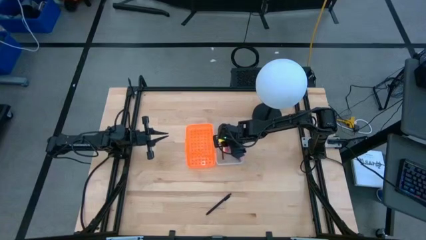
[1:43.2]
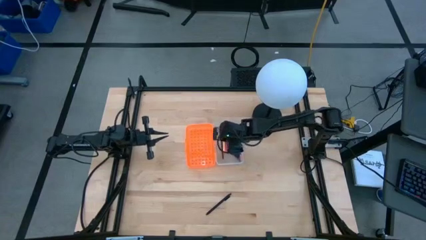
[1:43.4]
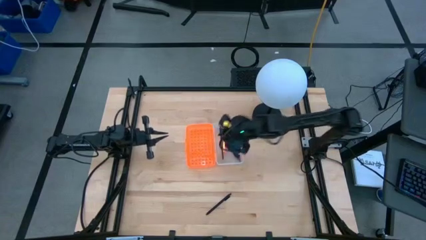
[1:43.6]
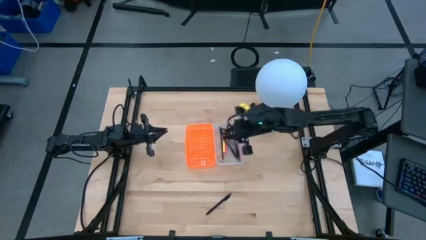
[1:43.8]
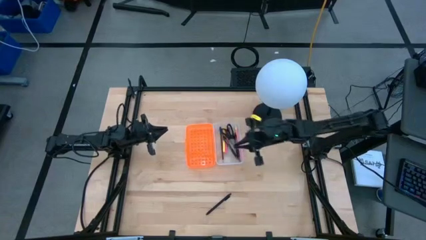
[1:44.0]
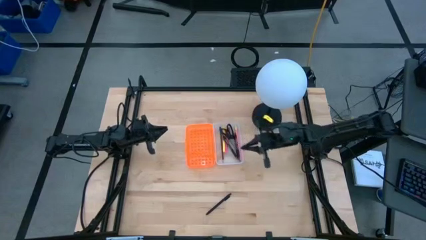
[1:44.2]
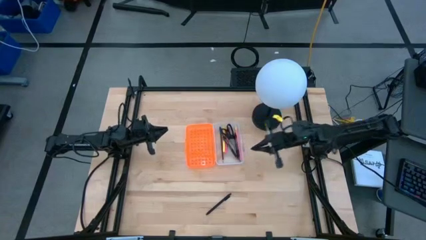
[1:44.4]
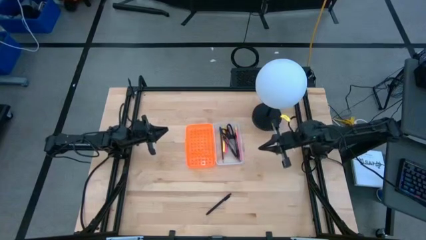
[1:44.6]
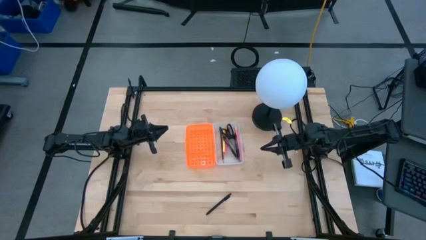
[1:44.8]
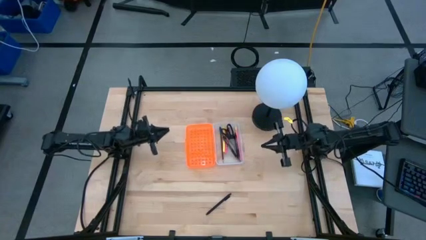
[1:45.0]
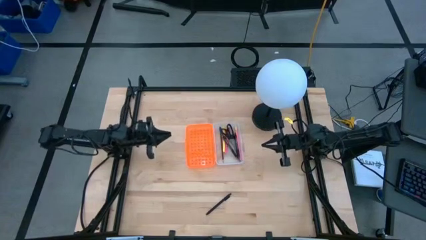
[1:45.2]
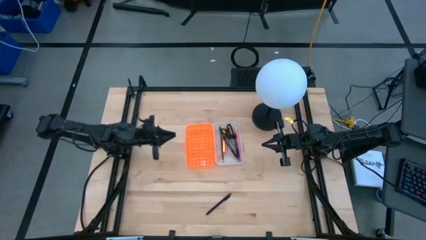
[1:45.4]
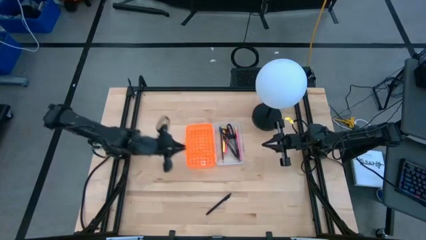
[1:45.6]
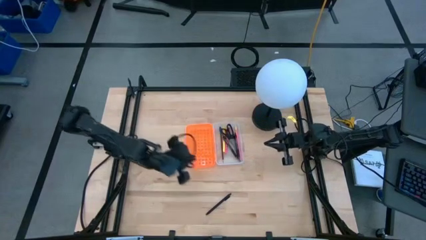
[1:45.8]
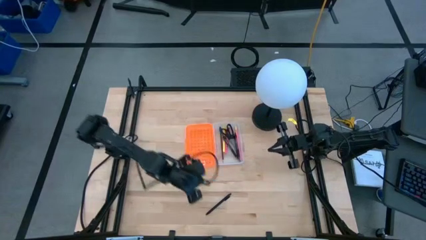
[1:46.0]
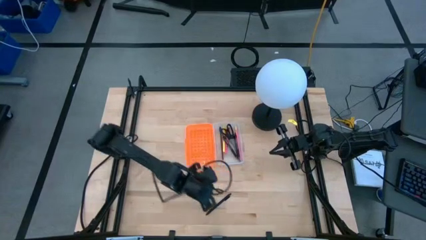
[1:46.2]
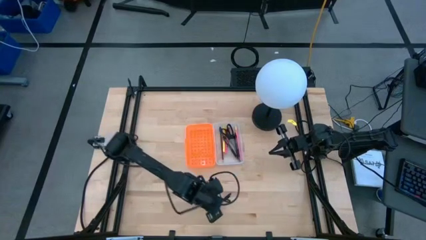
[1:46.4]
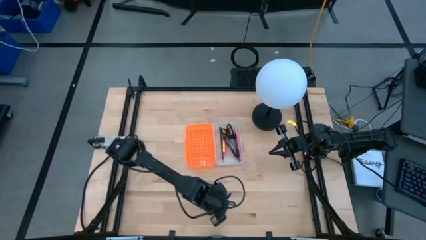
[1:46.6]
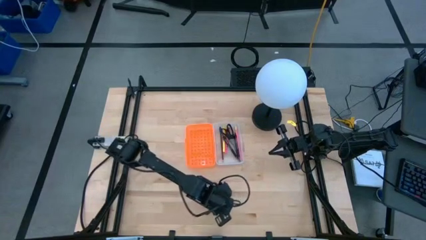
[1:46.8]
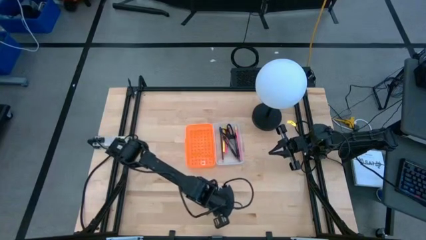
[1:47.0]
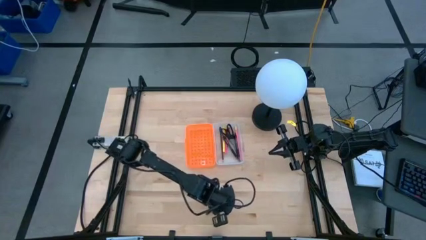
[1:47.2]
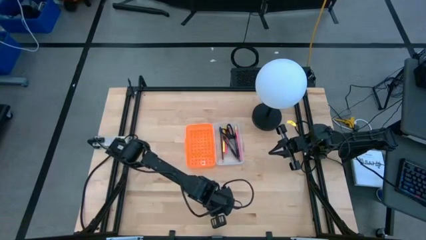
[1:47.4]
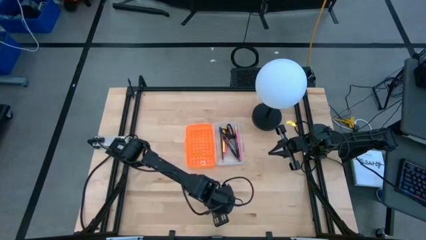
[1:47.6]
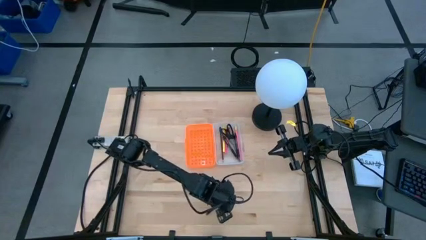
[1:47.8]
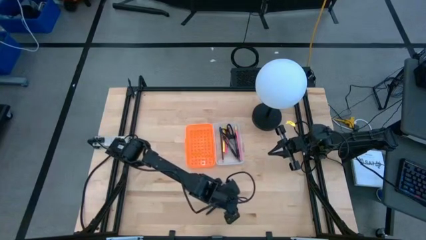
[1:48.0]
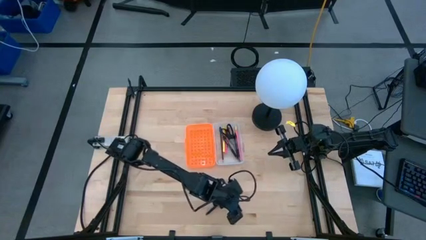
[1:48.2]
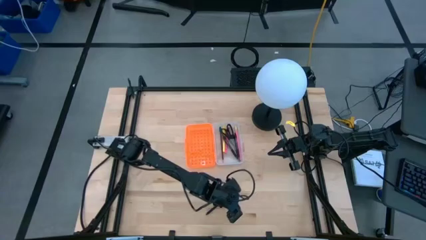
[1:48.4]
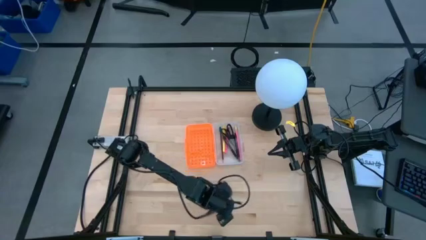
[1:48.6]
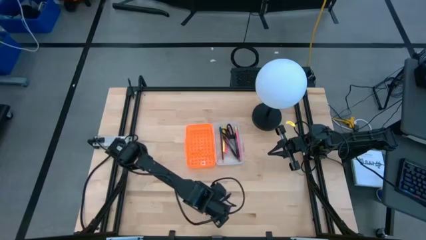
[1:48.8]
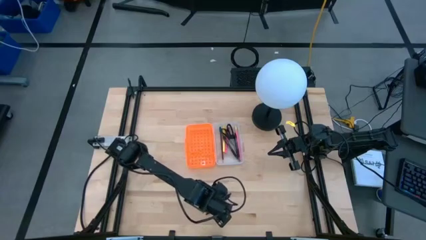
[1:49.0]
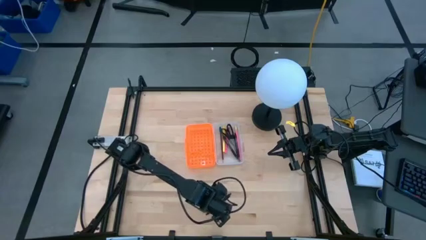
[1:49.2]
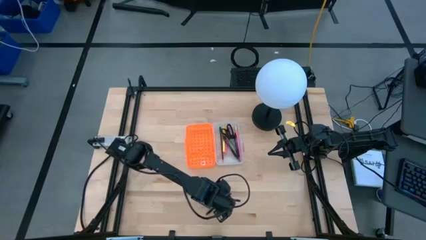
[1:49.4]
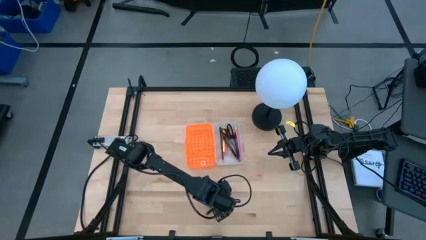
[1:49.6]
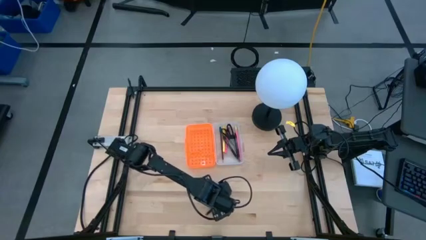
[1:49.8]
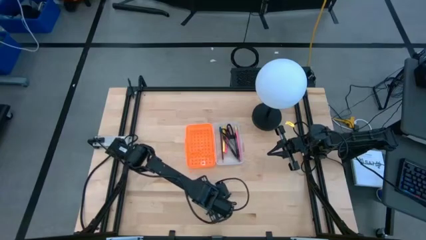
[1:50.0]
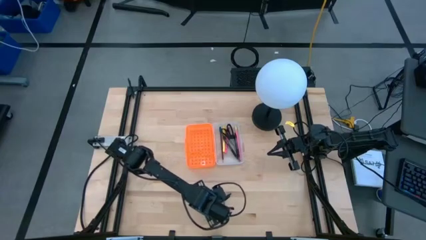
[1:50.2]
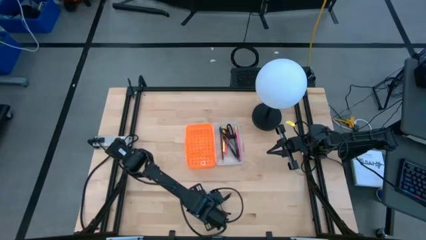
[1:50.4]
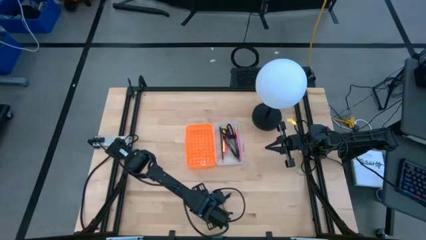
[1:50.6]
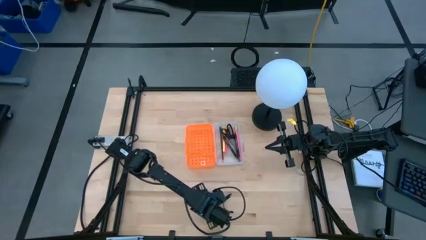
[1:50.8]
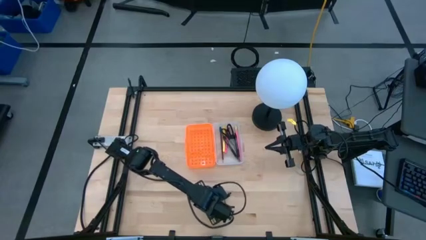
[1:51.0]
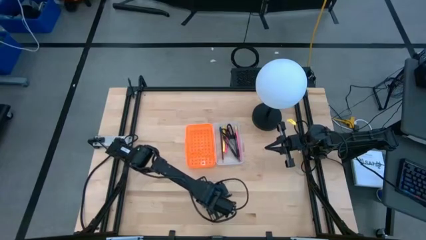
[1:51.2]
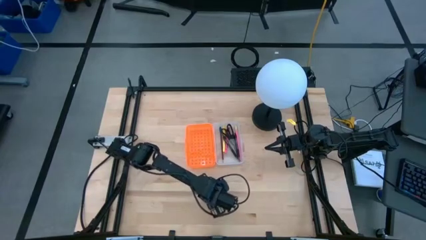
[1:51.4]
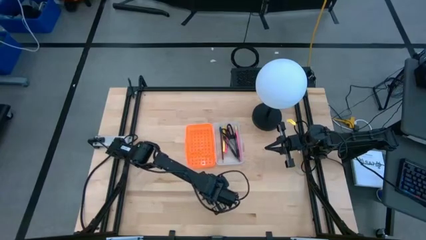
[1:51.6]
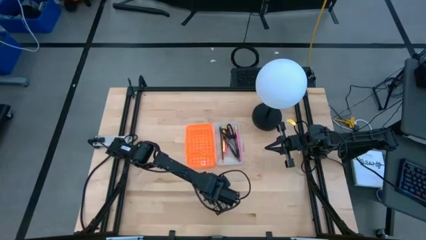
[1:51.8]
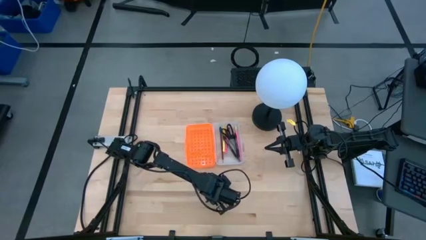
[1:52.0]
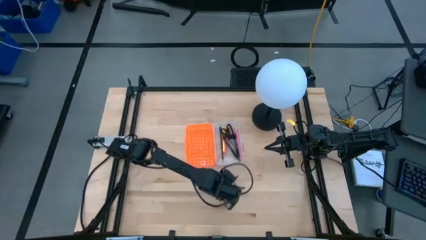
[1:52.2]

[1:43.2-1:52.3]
Task: Pick & place school supplies into a supply box
Put the black pen into the orange supply box

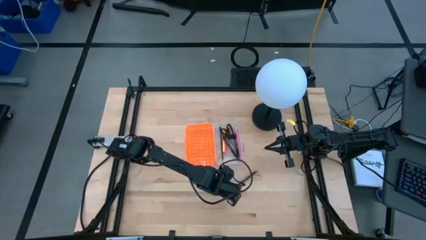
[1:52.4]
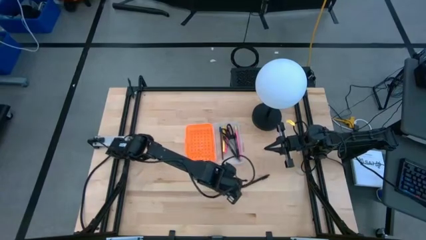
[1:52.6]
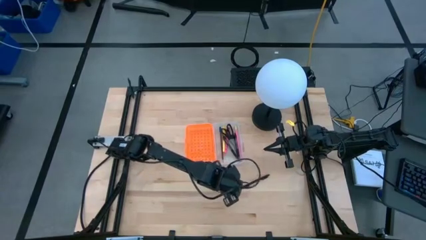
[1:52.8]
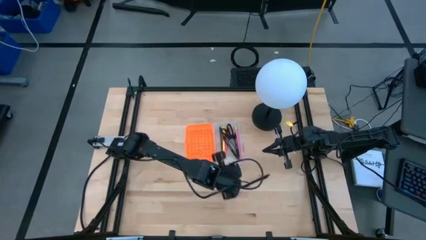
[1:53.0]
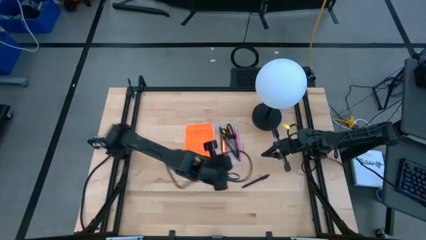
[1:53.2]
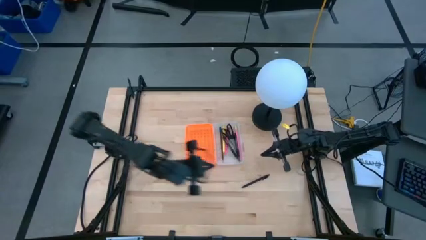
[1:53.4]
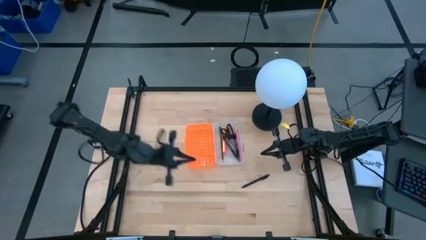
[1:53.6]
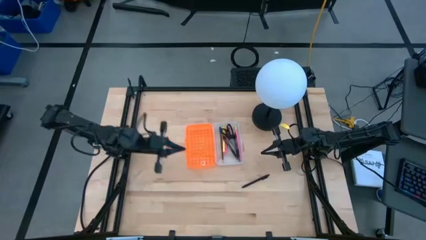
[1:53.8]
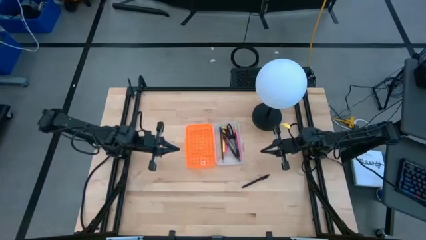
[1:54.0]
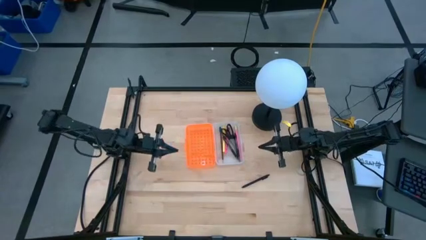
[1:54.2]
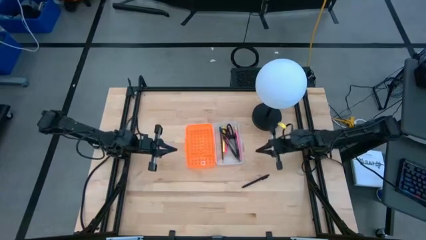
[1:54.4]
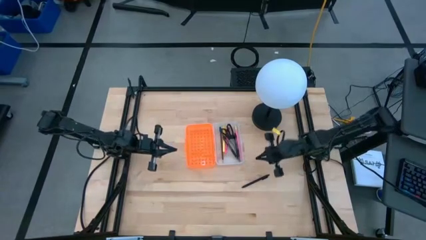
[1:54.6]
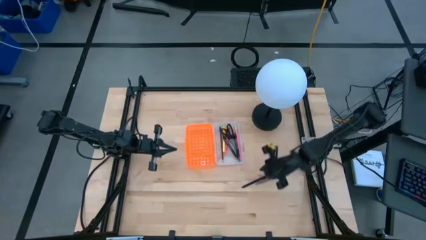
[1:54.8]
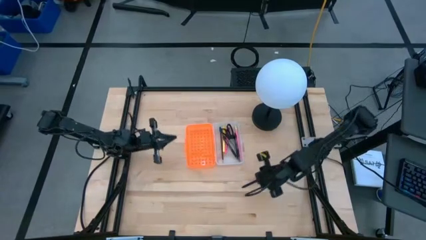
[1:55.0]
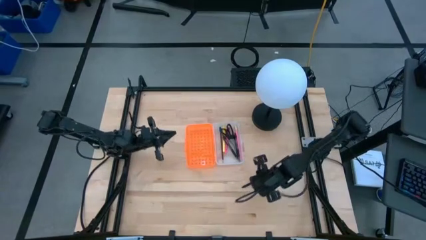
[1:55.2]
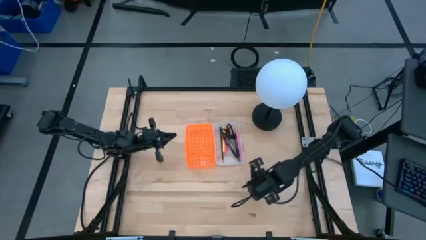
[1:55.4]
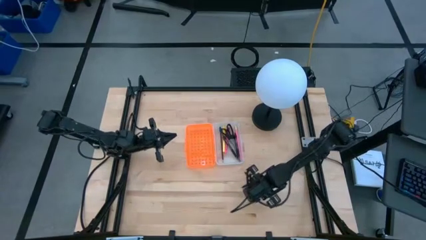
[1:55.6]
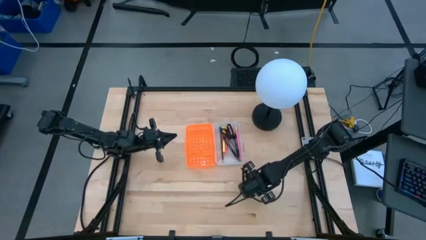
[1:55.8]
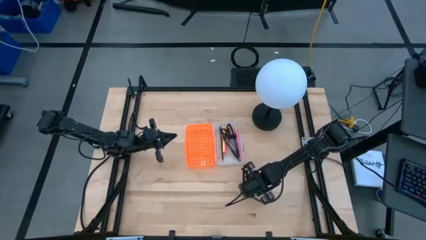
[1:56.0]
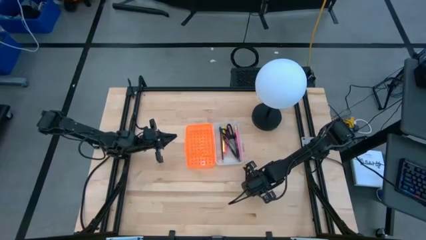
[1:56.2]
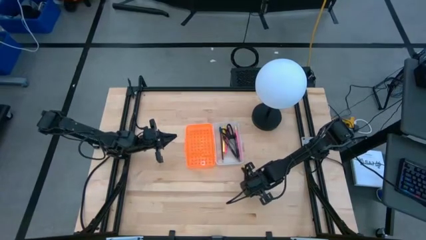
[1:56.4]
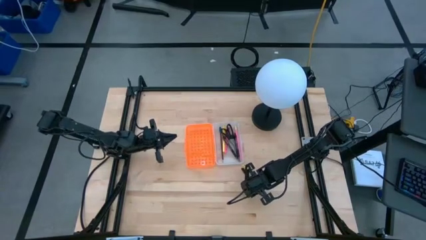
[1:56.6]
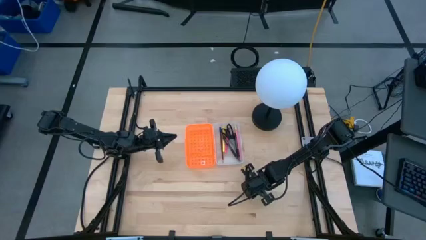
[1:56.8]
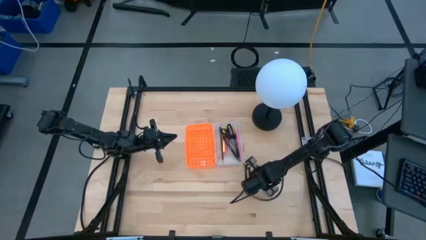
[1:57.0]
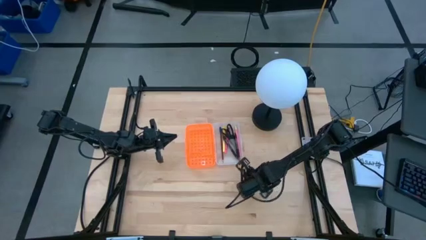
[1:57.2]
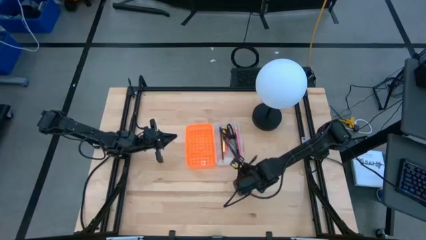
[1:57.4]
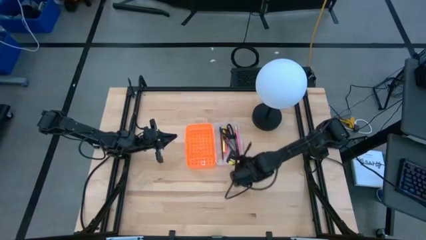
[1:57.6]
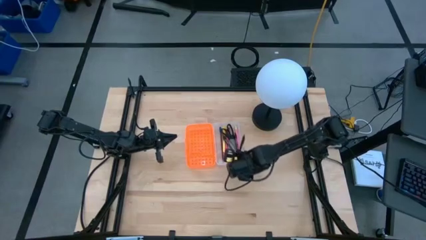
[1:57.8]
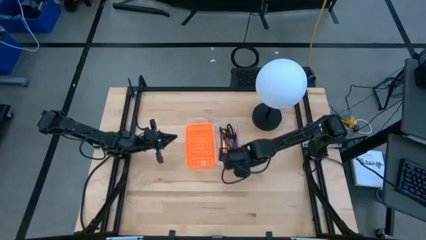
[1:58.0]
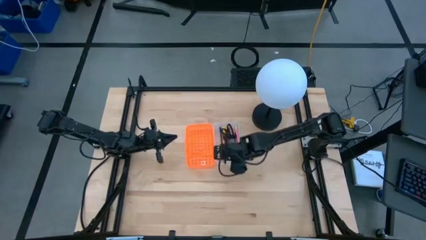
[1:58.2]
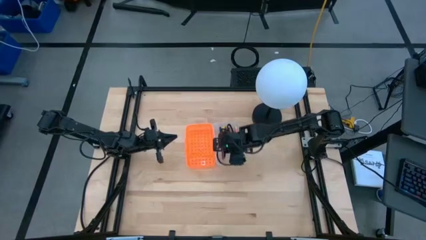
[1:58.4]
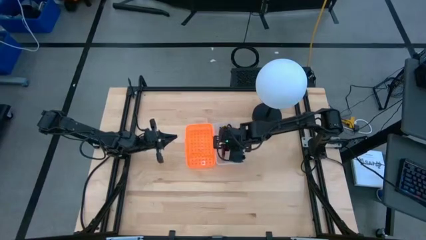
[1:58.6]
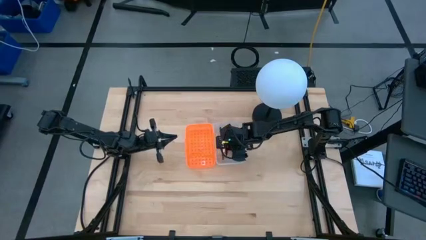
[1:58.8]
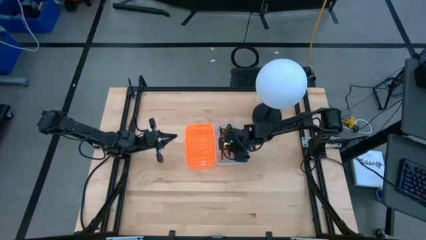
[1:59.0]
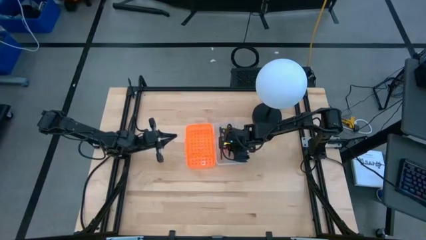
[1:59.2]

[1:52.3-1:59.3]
Put the black pen into the orange supply box
